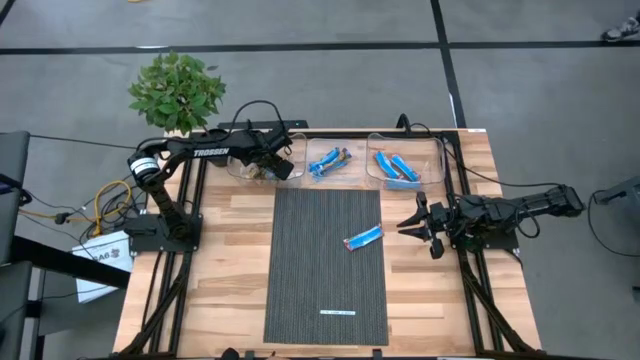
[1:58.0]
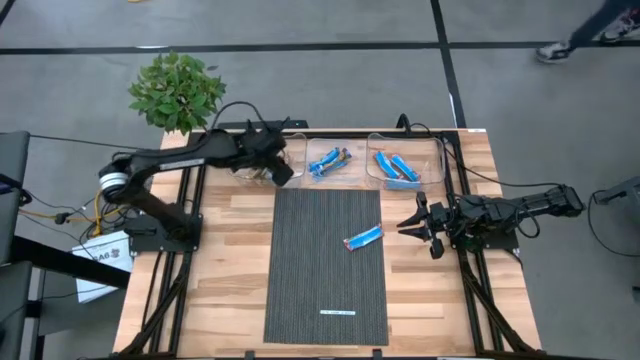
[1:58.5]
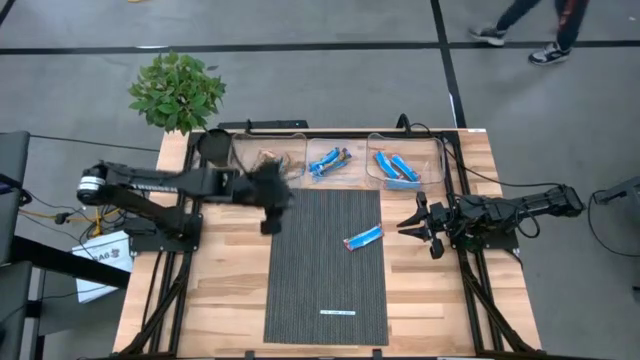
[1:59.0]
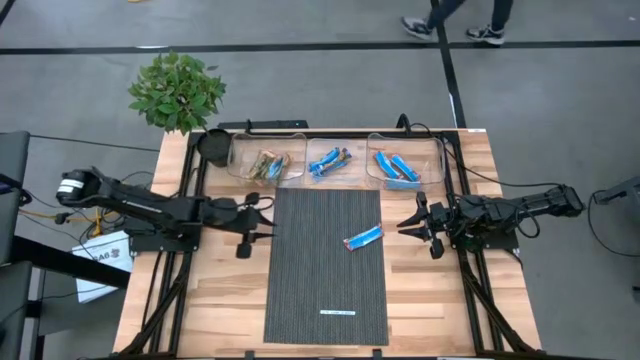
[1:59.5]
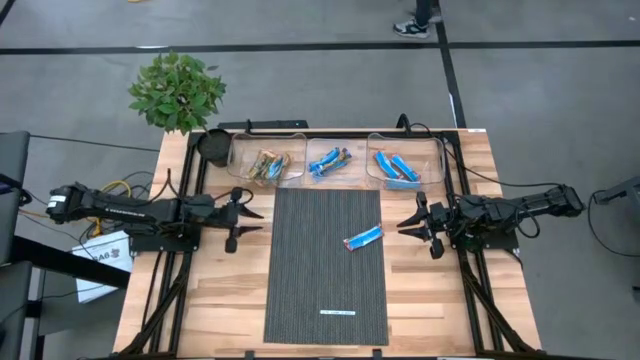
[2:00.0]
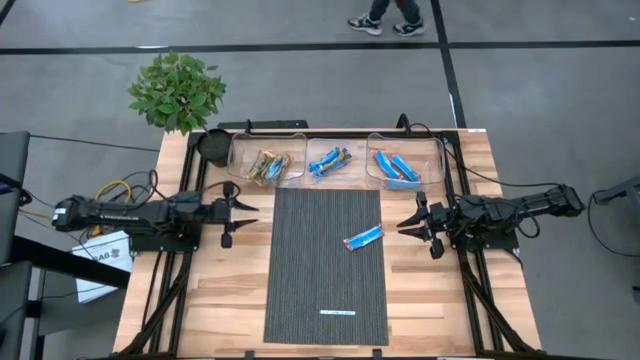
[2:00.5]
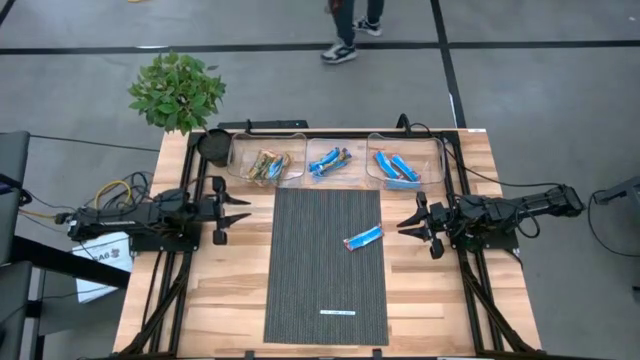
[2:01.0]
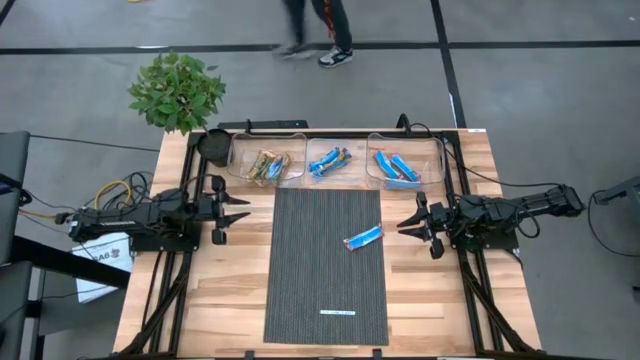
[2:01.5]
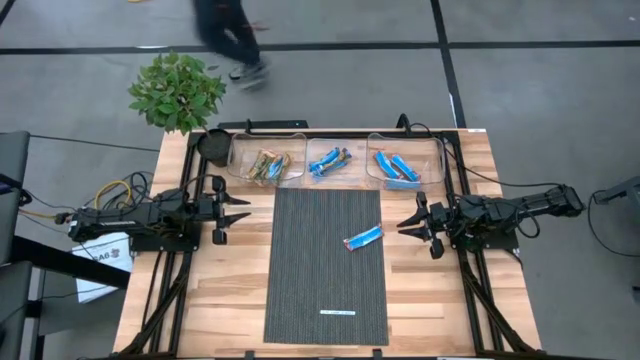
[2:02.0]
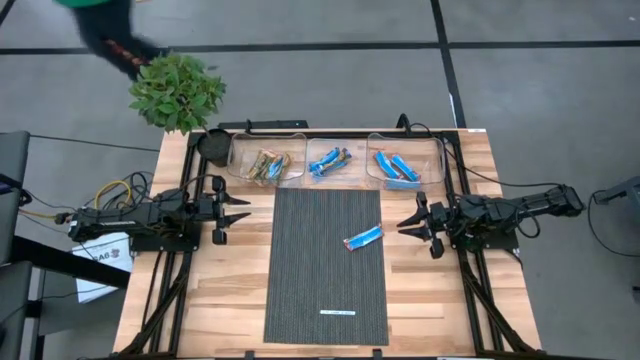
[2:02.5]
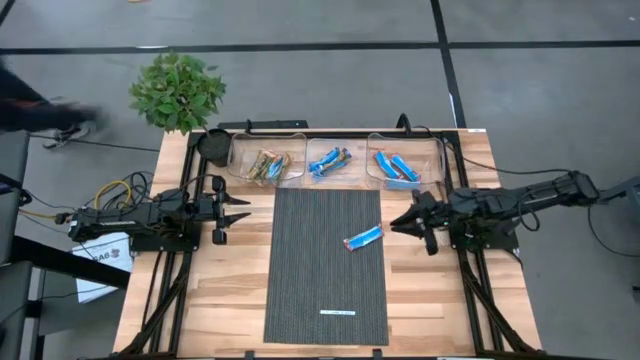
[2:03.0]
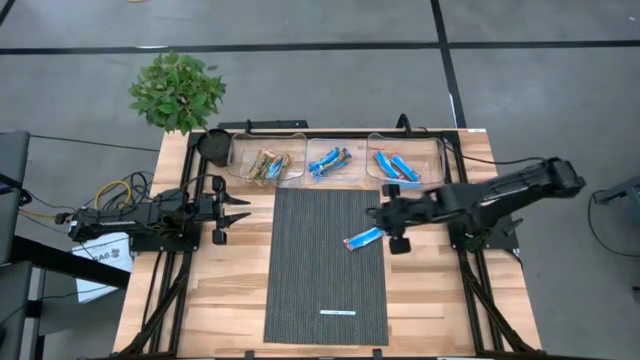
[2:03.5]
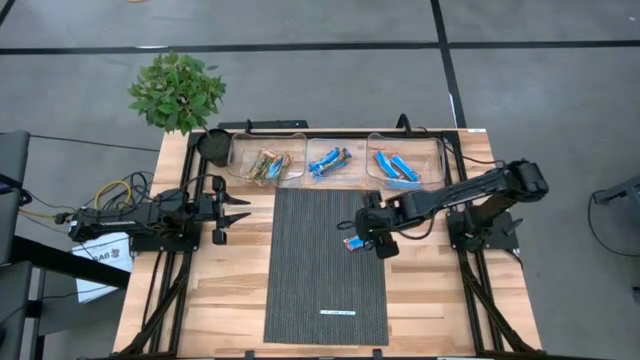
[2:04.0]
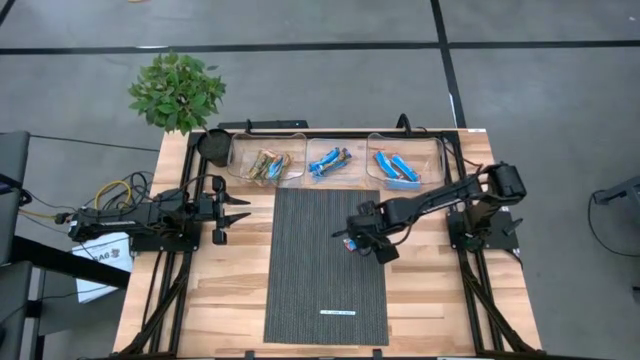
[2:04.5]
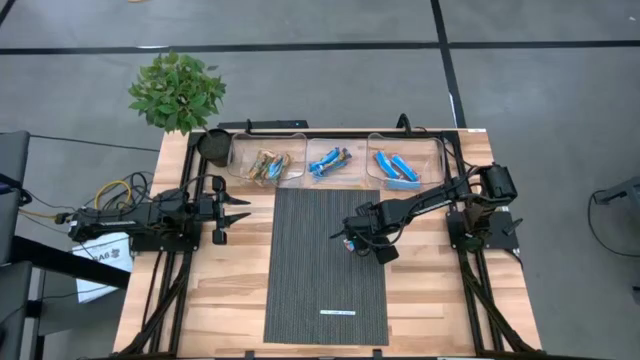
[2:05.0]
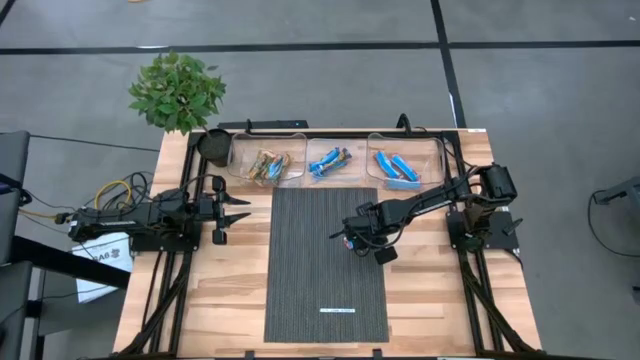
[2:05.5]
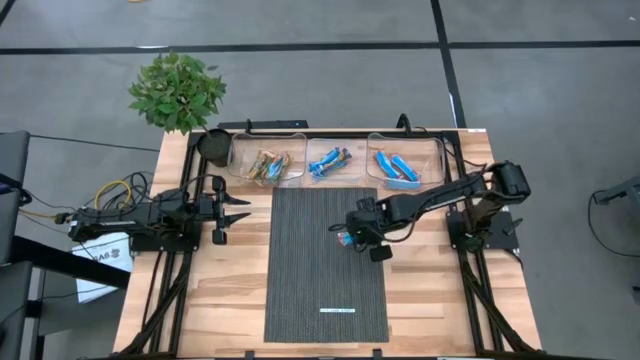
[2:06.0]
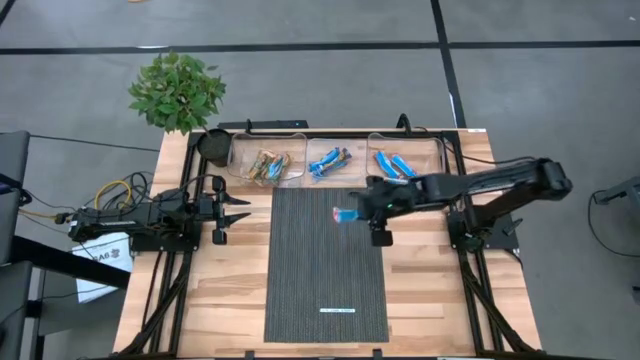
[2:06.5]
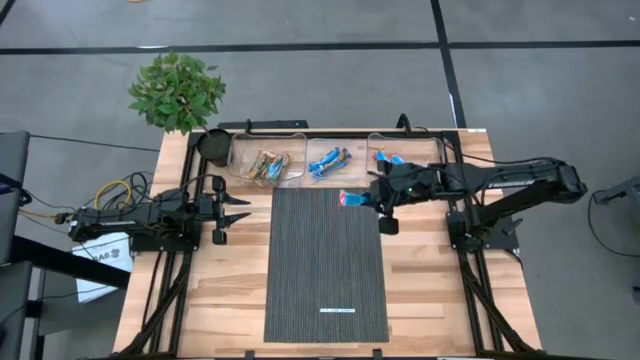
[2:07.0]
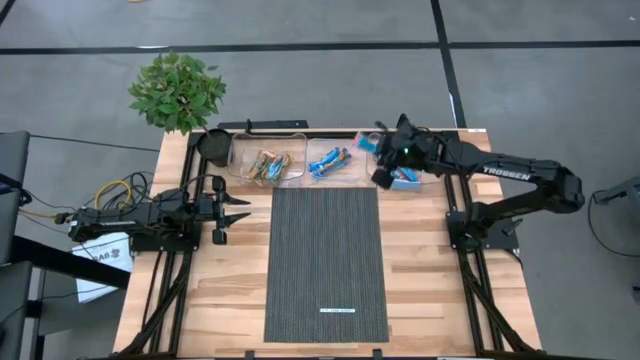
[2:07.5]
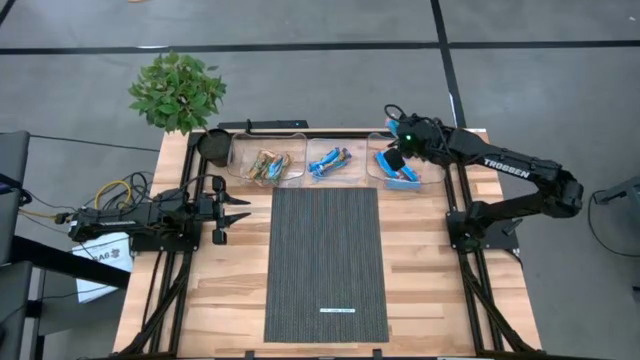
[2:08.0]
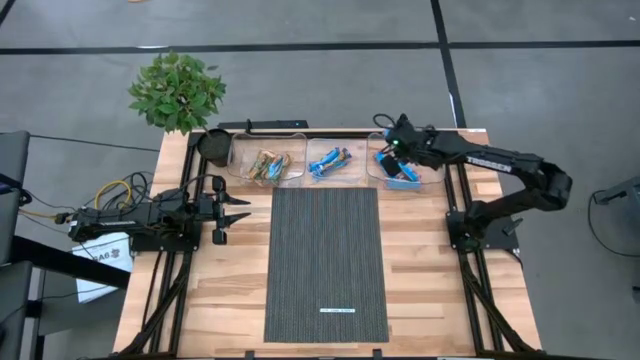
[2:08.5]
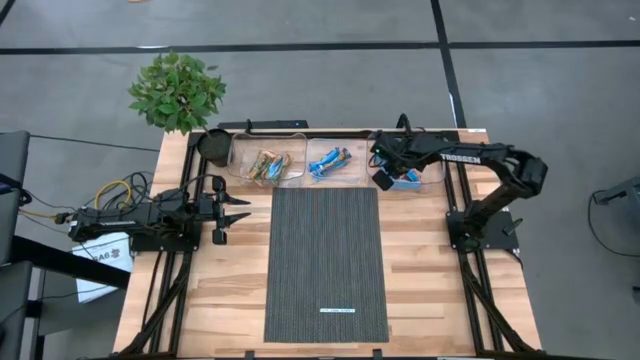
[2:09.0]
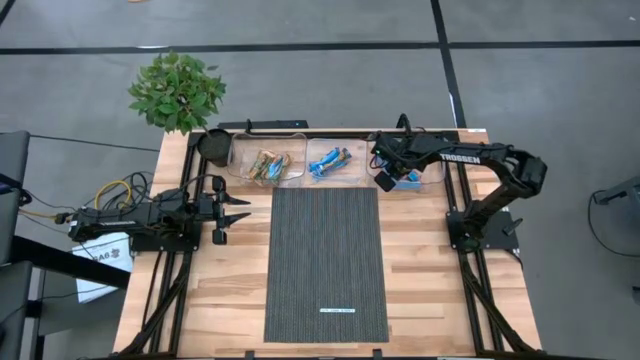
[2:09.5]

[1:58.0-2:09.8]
Task: Pick and place Granola Bars by type
Put the red granola bar into the right transparent bin

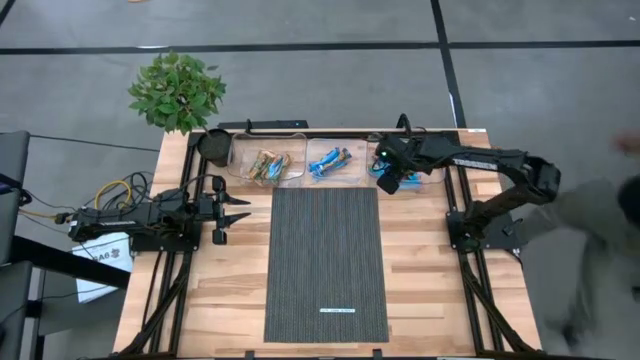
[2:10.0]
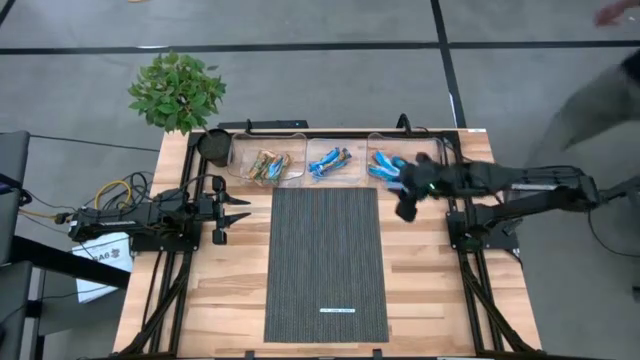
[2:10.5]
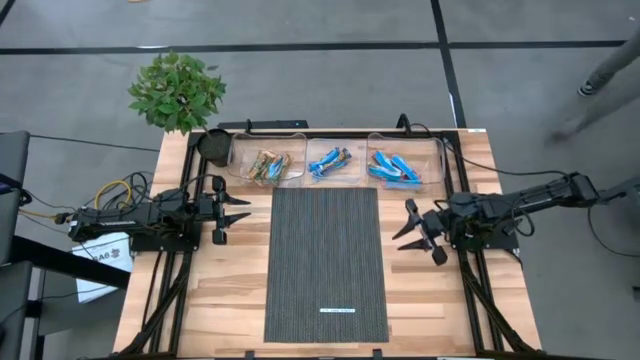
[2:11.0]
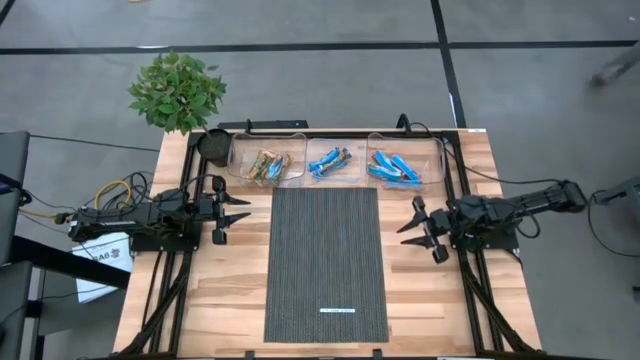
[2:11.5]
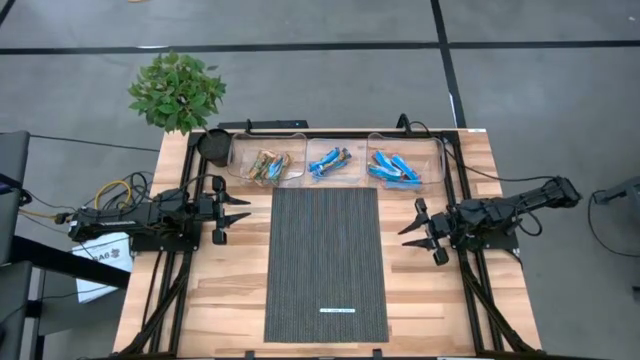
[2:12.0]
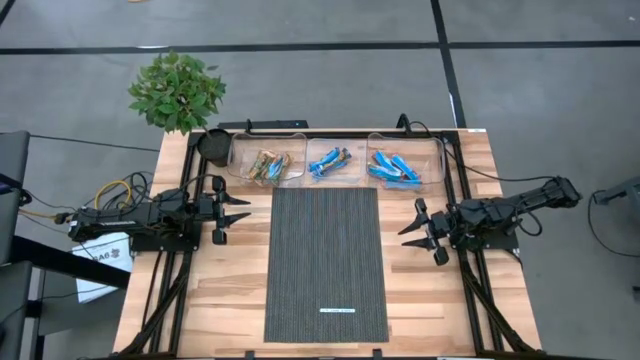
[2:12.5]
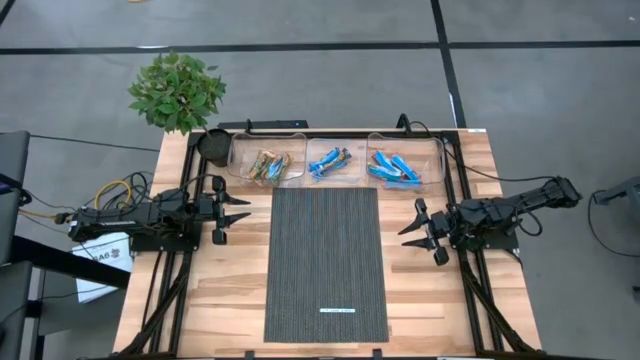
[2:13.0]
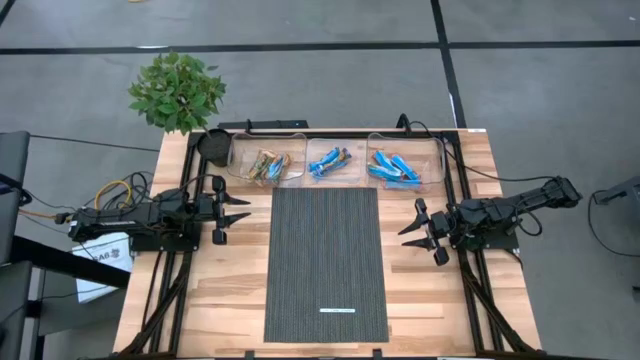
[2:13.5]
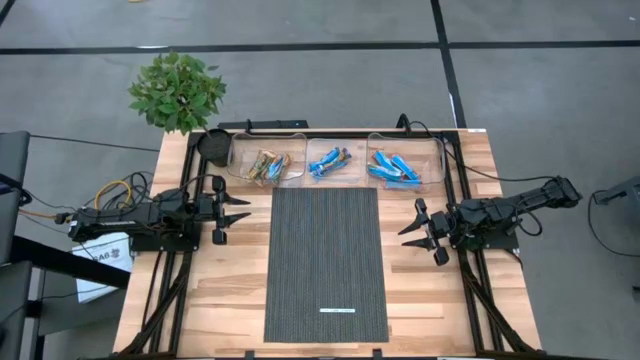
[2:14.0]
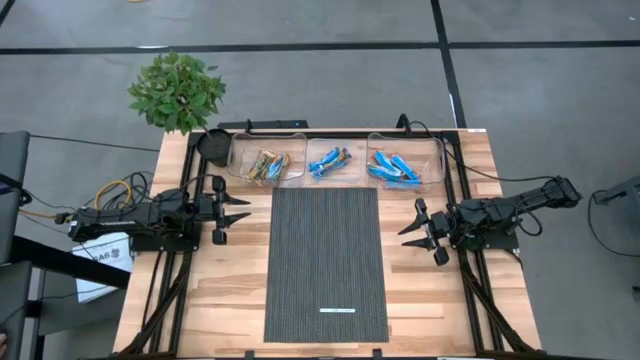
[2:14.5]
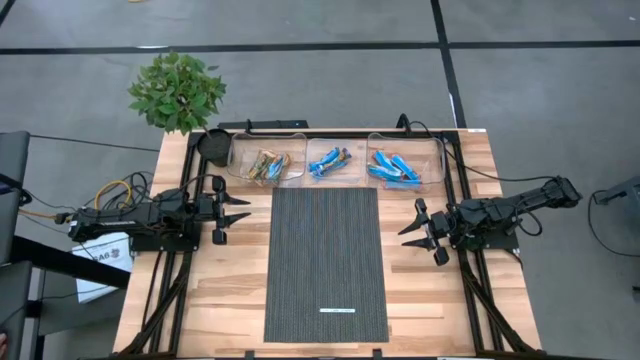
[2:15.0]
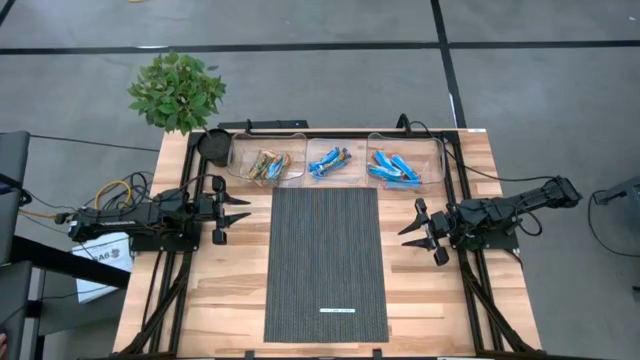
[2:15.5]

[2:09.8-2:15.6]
Return to Home Position

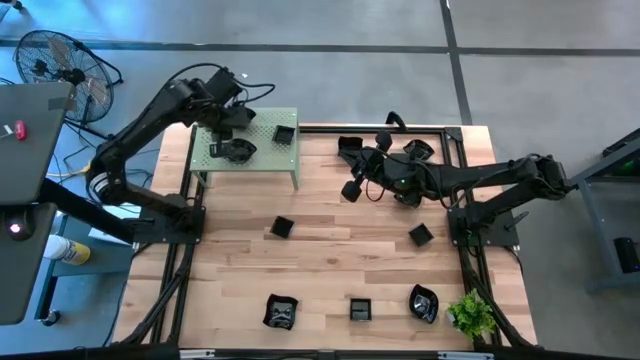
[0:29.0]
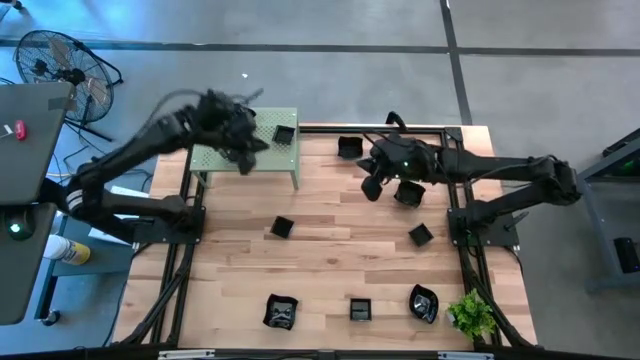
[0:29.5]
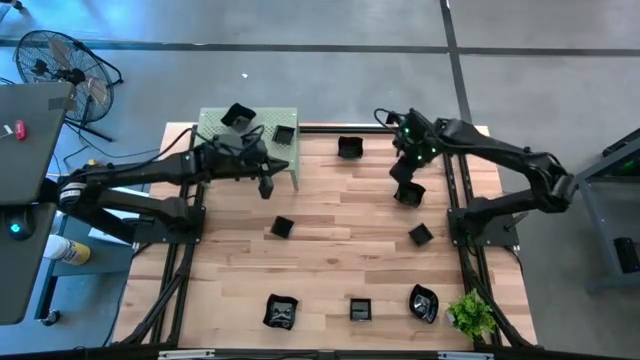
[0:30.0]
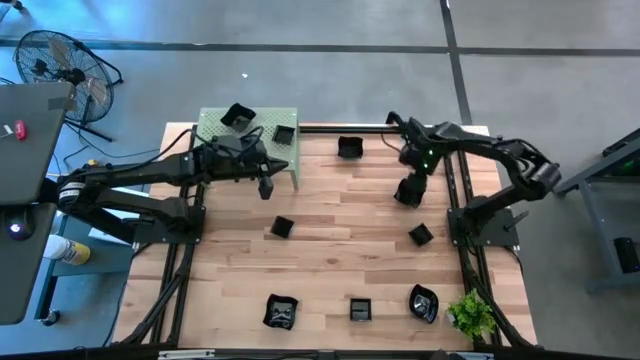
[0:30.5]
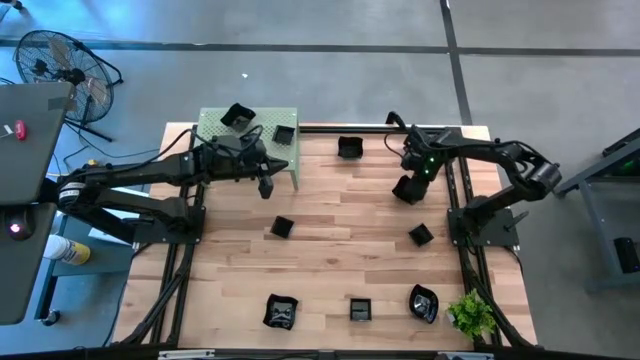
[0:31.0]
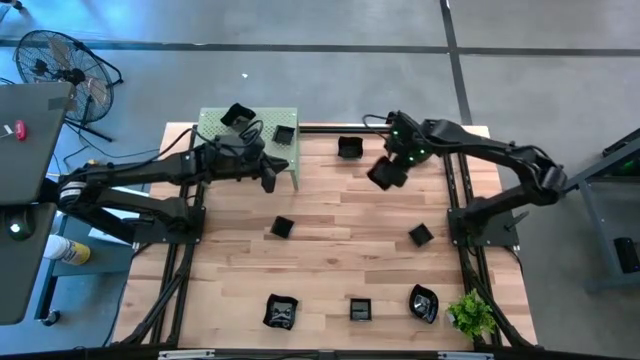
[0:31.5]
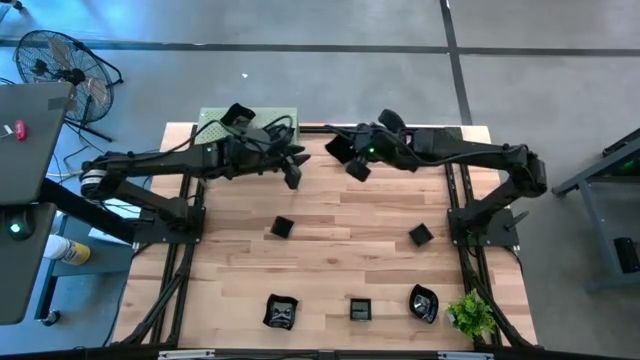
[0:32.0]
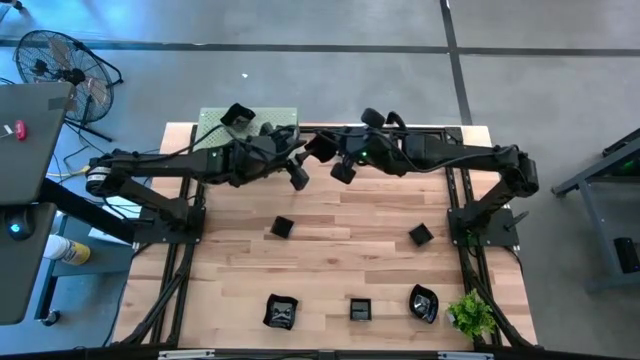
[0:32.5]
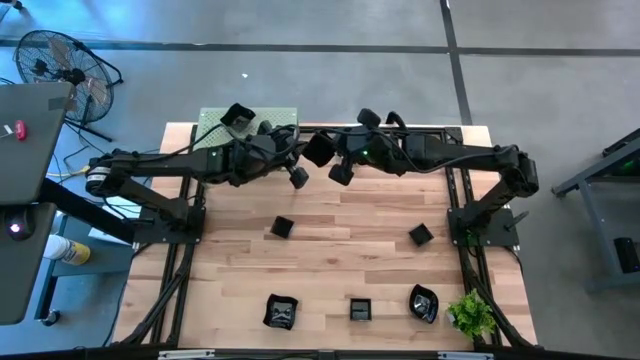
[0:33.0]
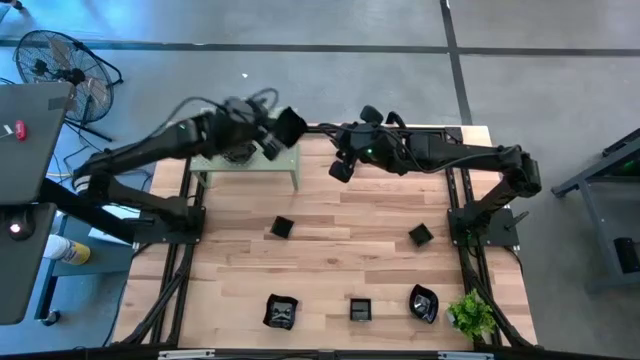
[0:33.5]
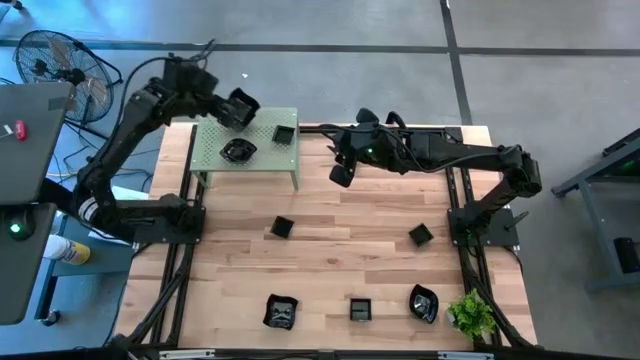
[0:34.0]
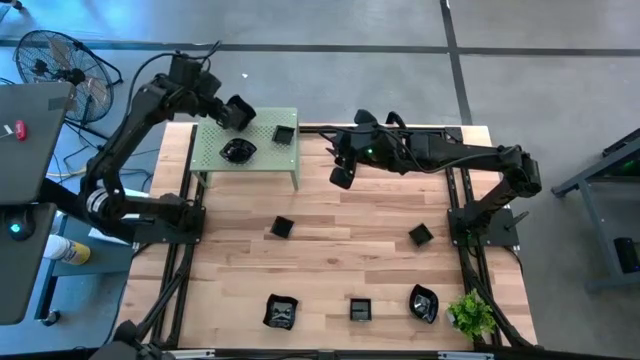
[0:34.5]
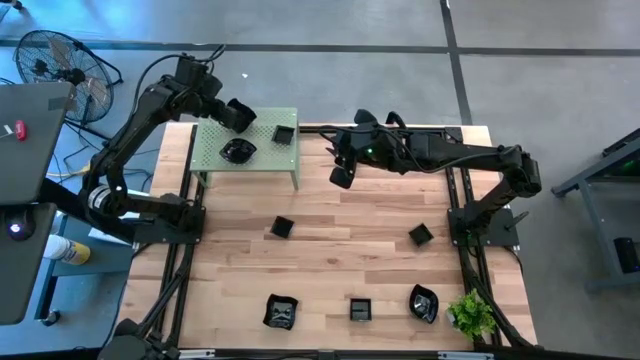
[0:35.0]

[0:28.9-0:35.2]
Task: Pick & Place Mini shaped plates
Stack the black distorted square plate on top of the black distorted square plate on the shelf
